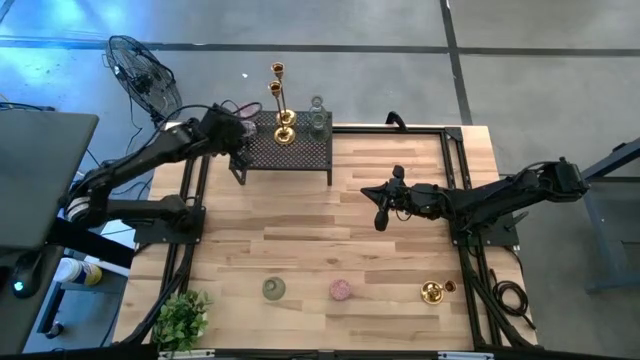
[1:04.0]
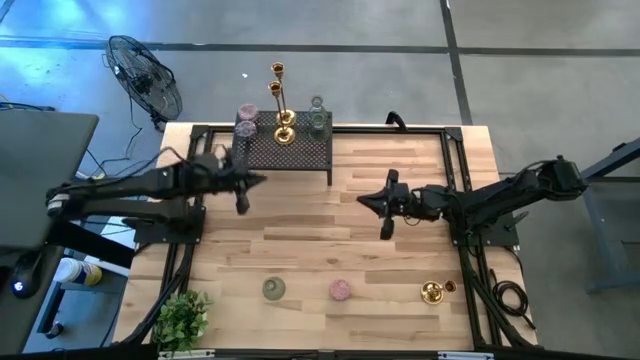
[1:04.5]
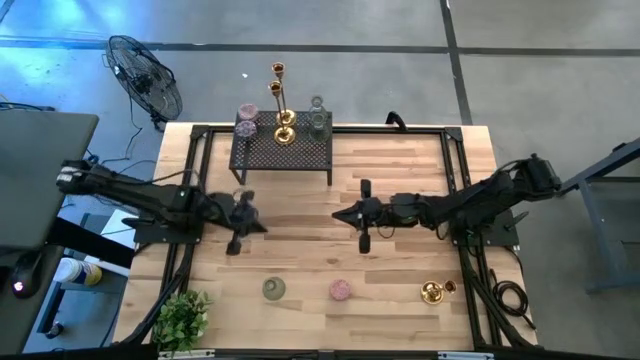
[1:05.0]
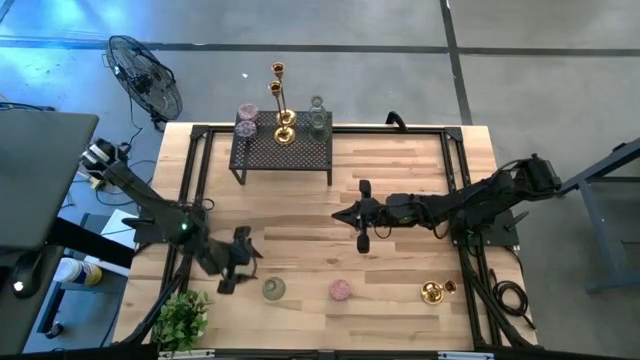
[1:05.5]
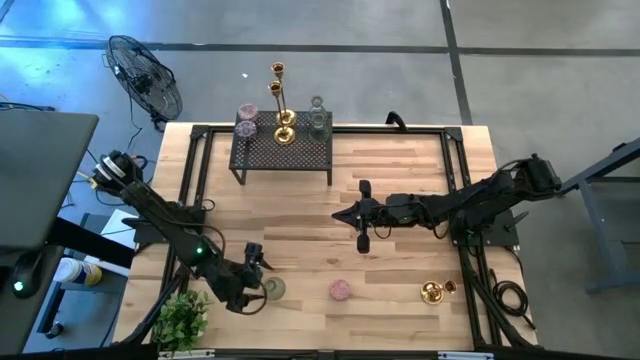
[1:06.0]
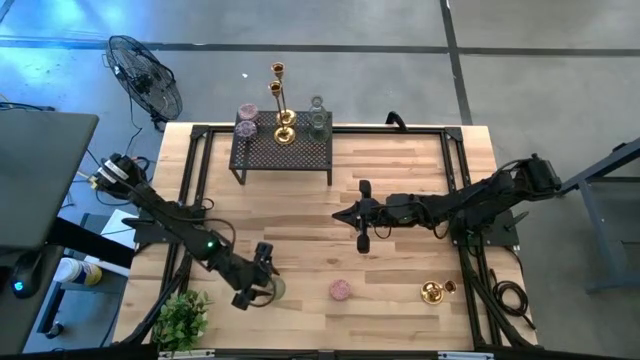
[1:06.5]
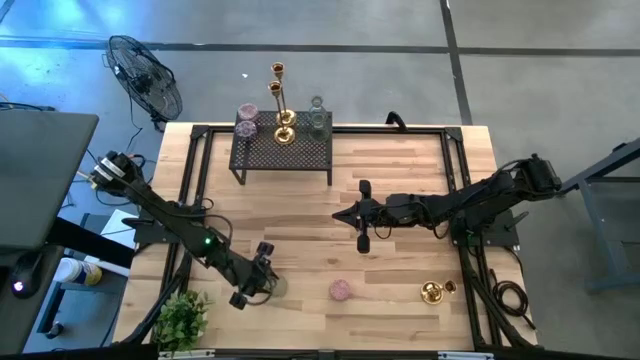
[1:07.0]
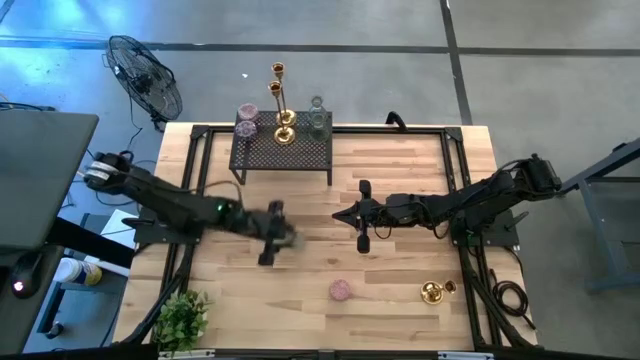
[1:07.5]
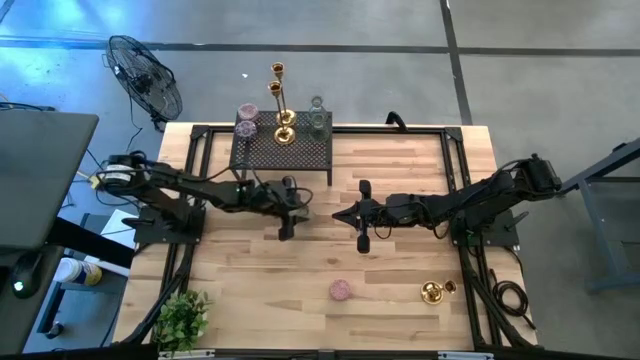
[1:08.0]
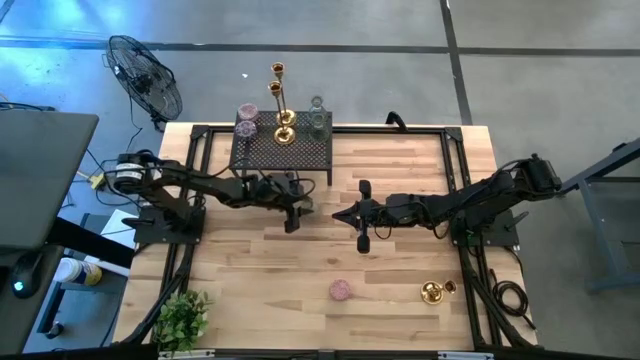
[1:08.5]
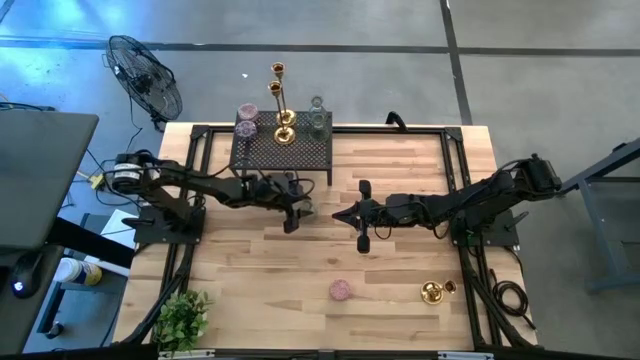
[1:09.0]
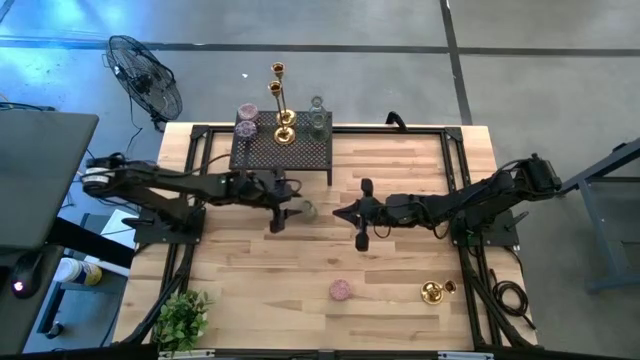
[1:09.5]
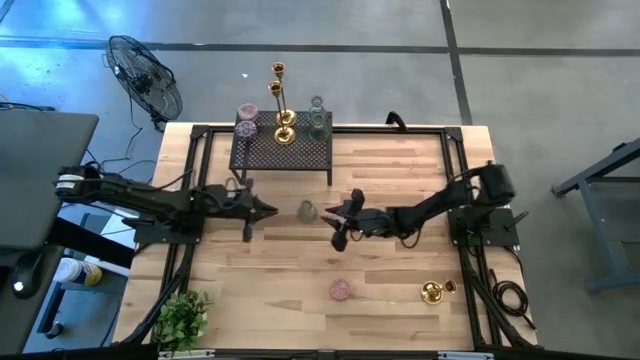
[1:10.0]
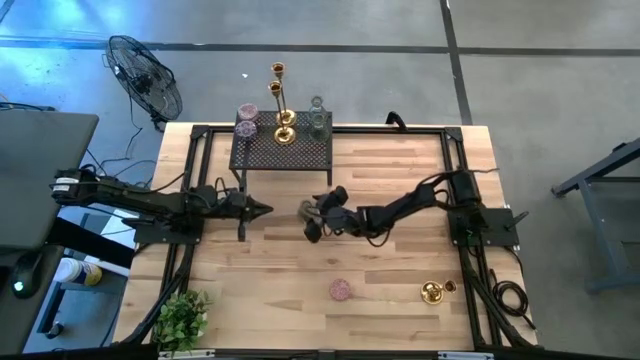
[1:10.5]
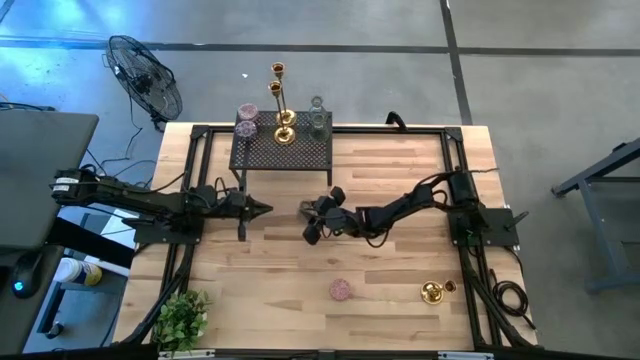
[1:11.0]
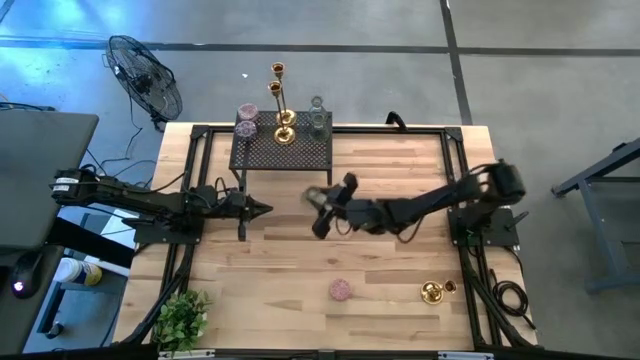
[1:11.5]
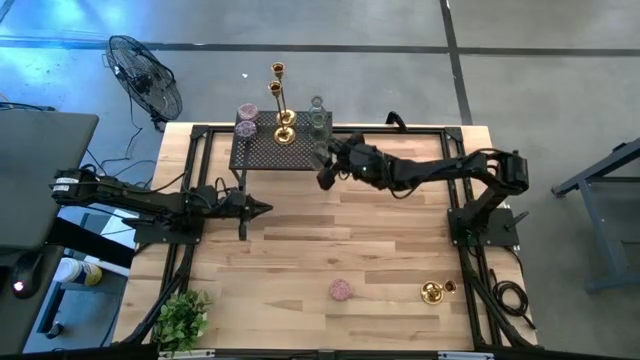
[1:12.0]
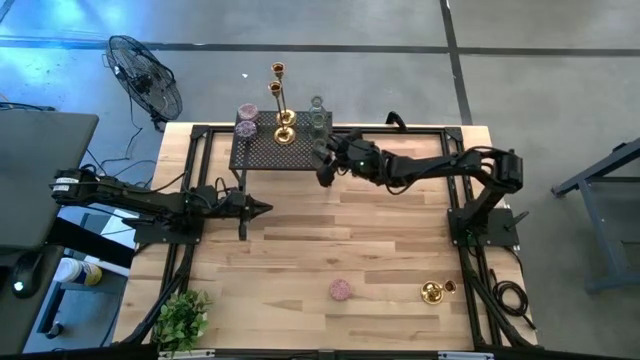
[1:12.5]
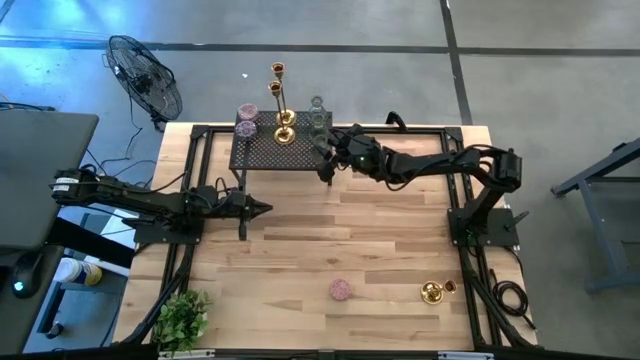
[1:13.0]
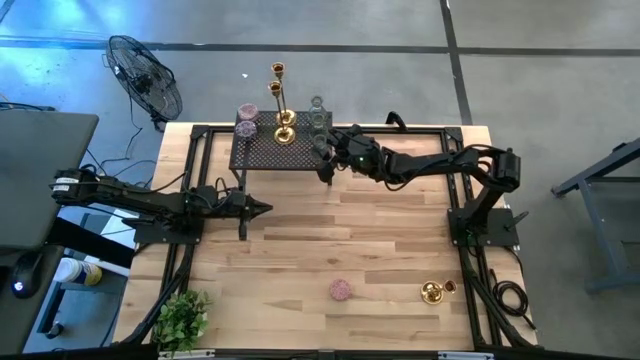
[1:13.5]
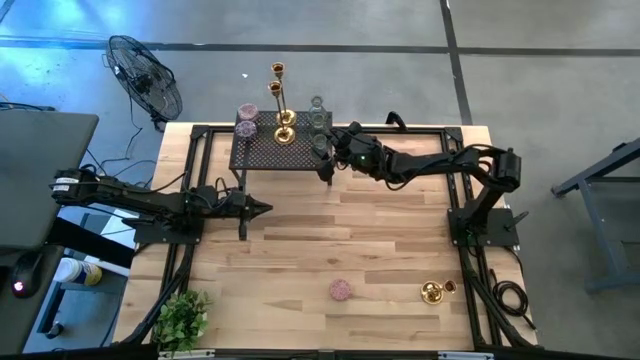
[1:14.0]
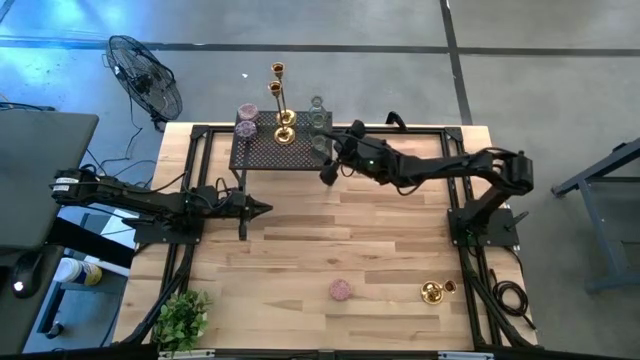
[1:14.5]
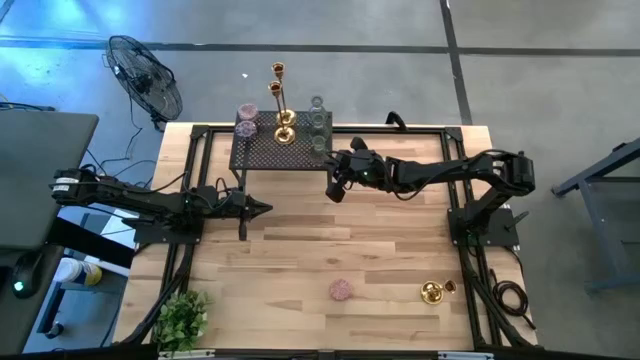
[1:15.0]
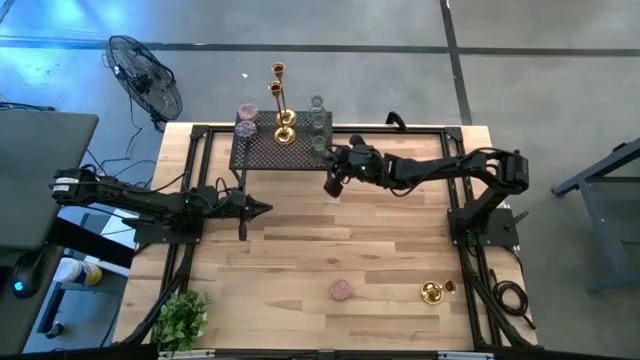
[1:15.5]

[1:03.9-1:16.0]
Task: Pick & Place candle stick holders
Put the green glass candle holder on the shelf aligned with the other green glass candle holders

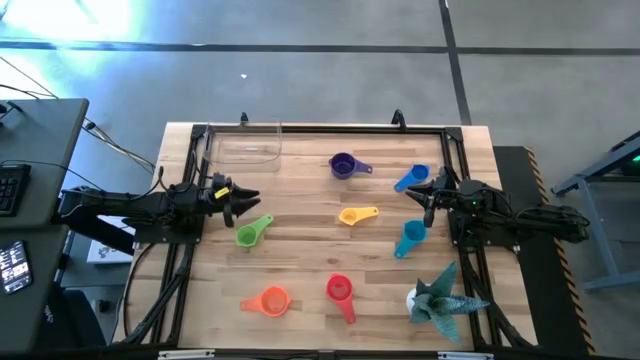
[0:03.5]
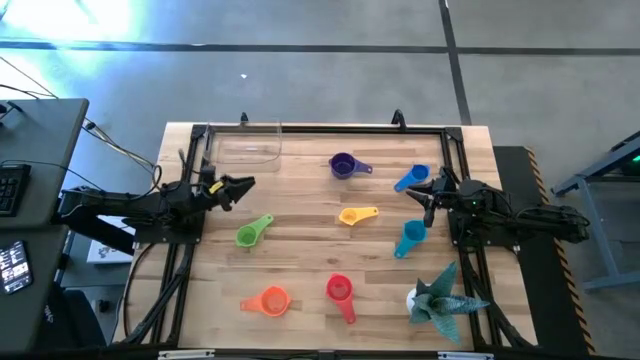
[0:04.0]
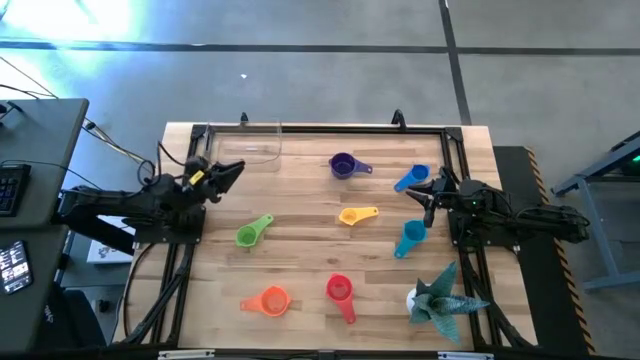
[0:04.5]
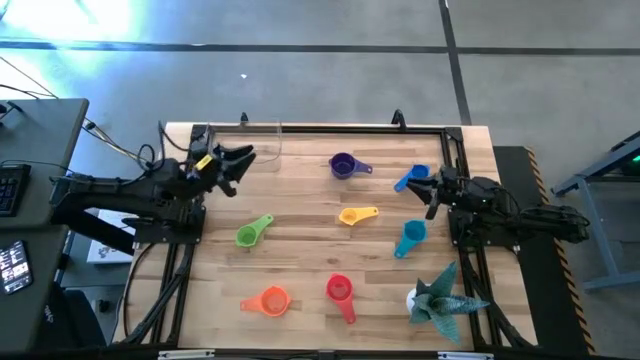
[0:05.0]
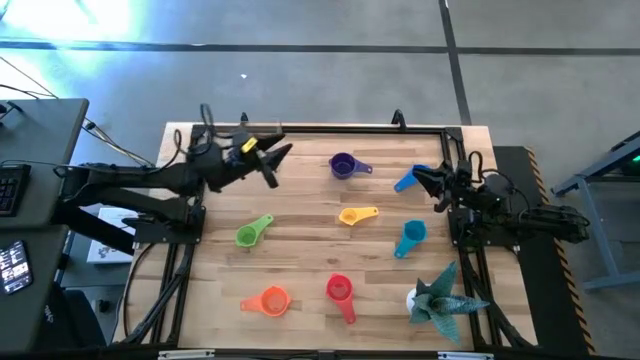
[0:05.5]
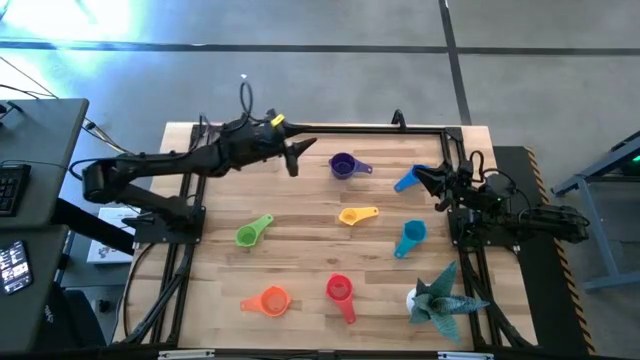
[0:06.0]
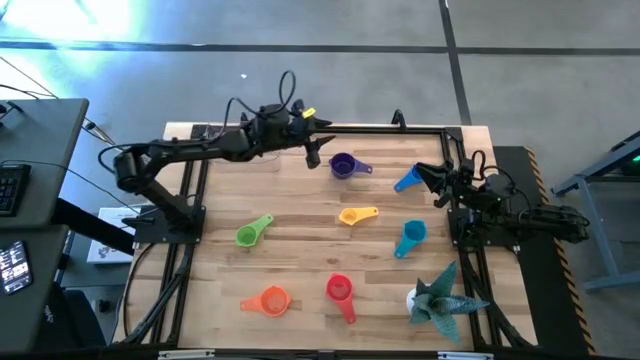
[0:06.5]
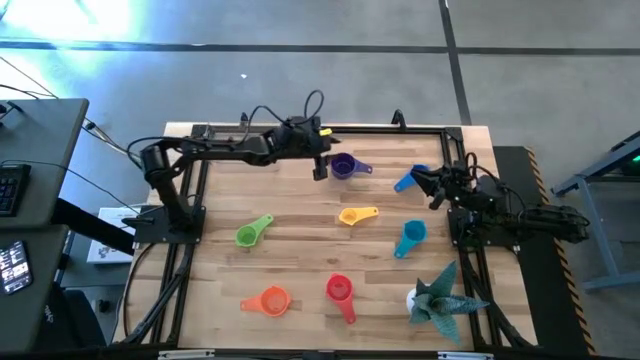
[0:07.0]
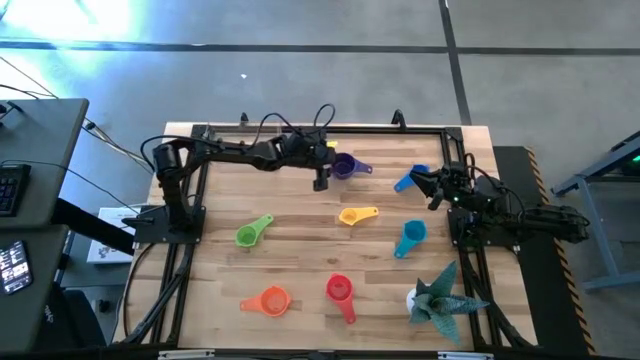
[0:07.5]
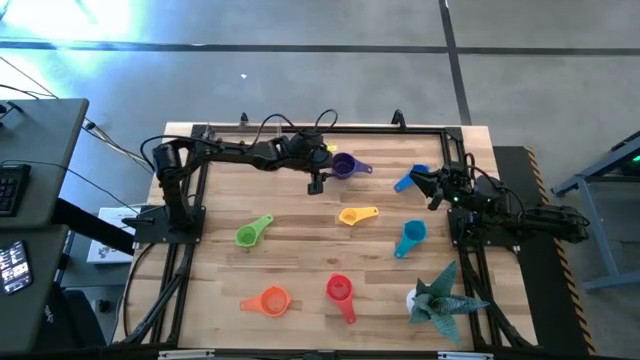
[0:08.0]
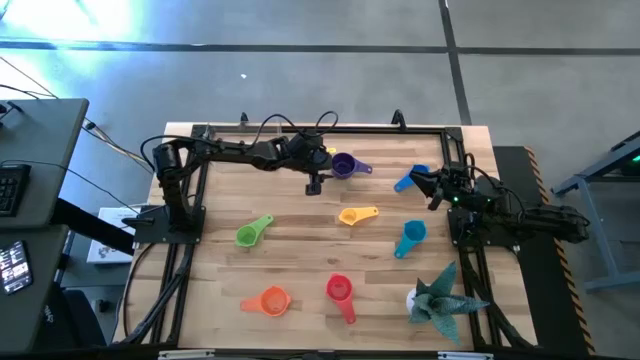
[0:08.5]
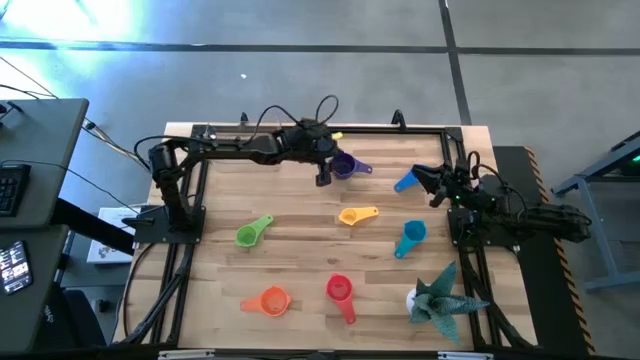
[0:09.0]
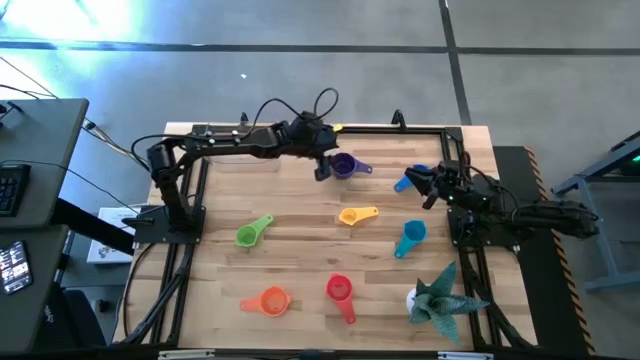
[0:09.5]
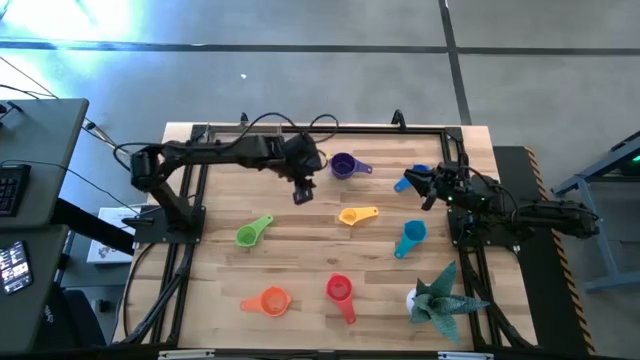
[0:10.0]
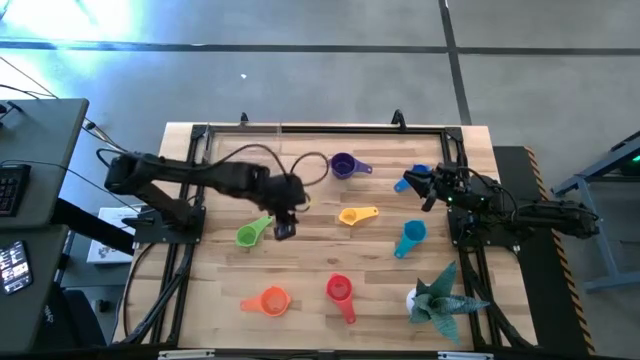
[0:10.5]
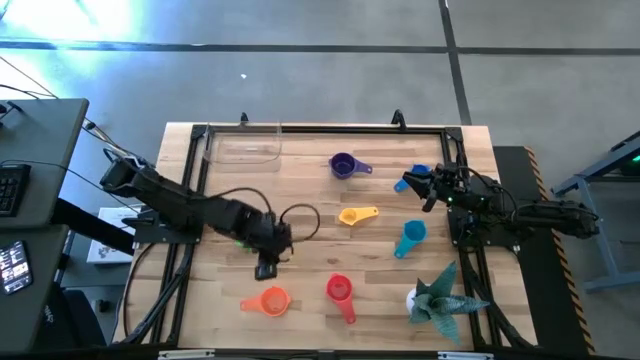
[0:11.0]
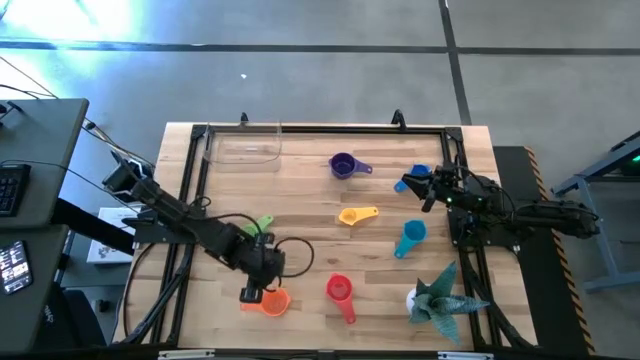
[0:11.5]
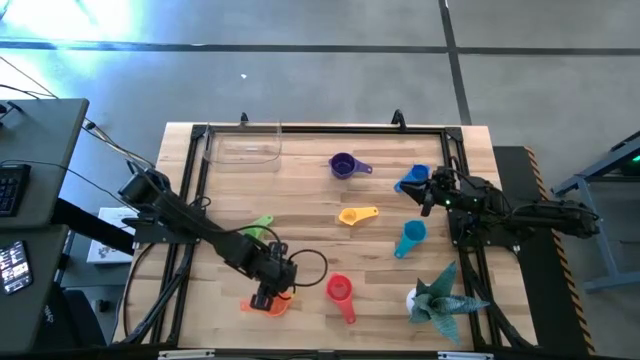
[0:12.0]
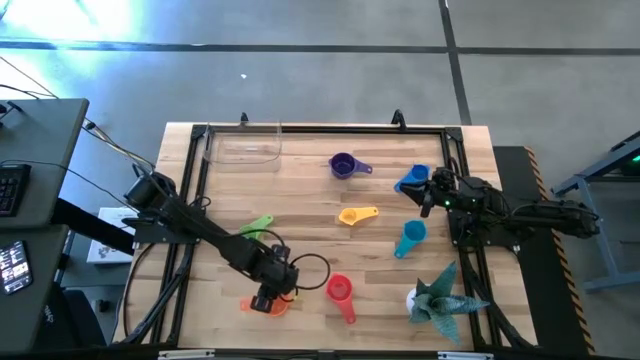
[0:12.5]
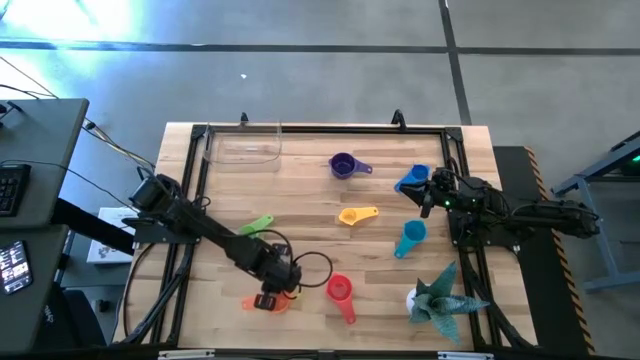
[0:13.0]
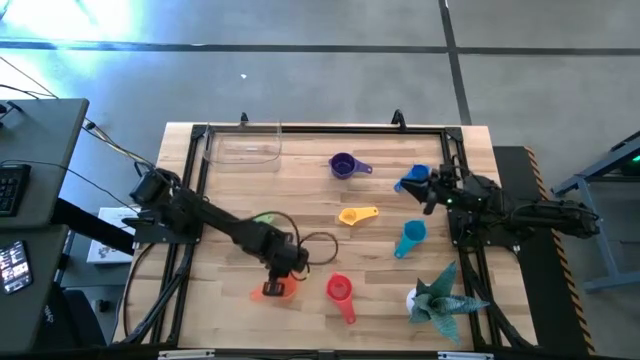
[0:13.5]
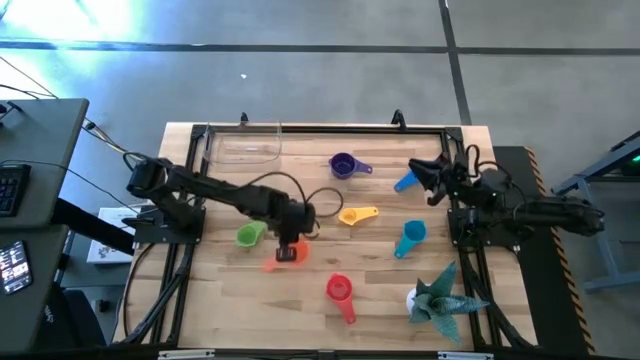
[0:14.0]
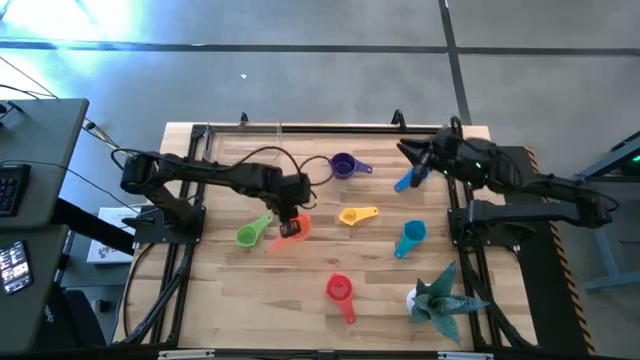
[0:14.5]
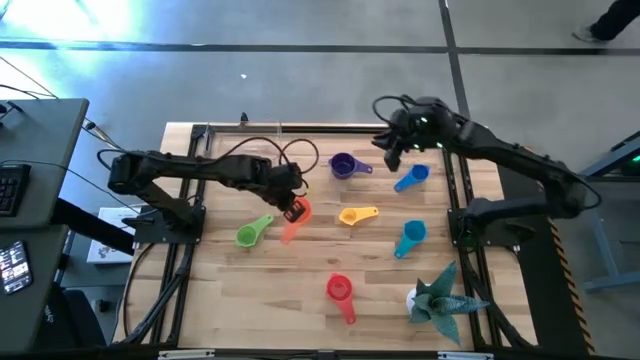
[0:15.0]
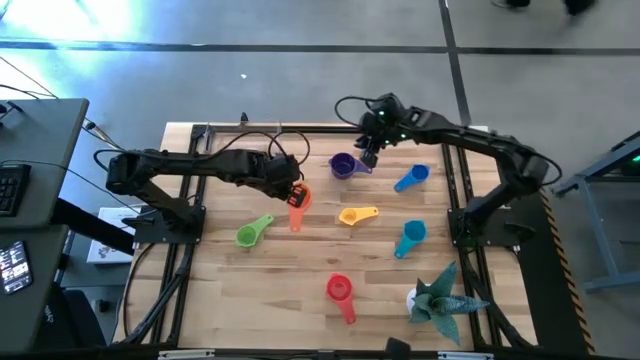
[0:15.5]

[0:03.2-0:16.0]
Task: Nest measuring cups in basket
Stack the orange measuring cup on top of the violet measuring cup
